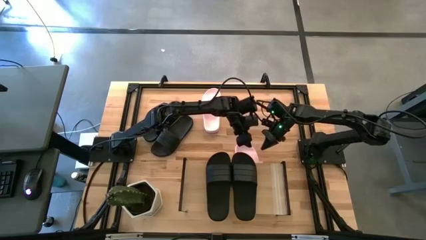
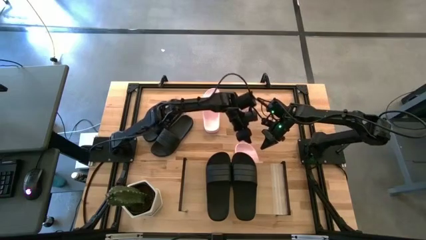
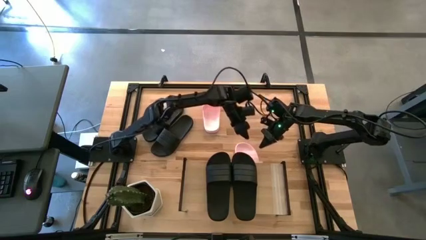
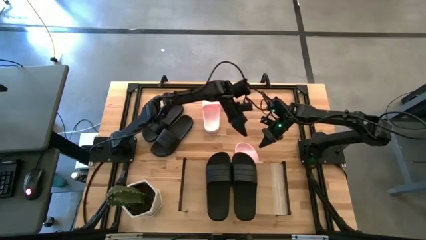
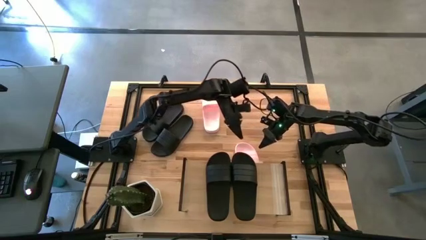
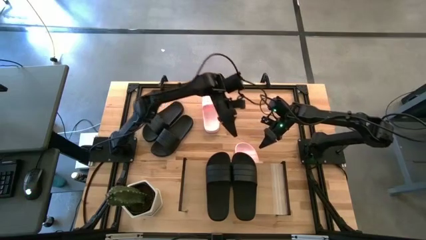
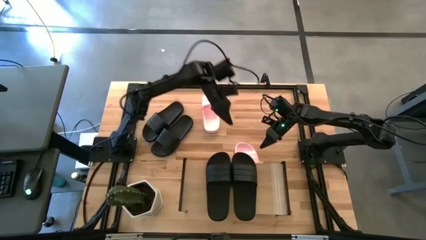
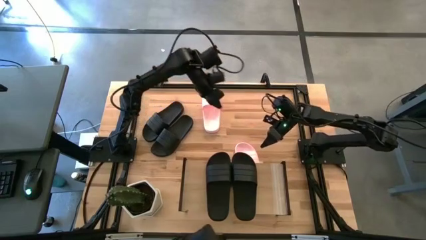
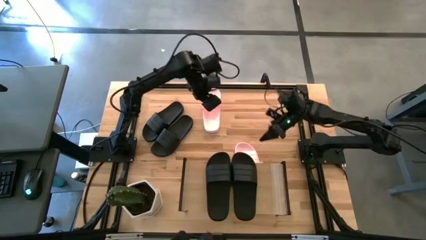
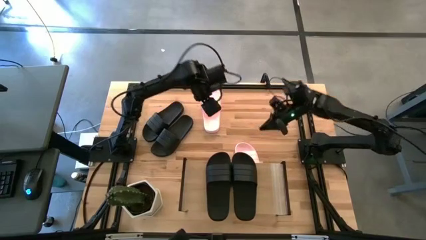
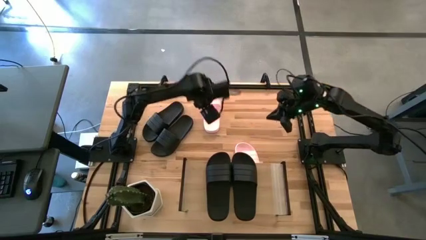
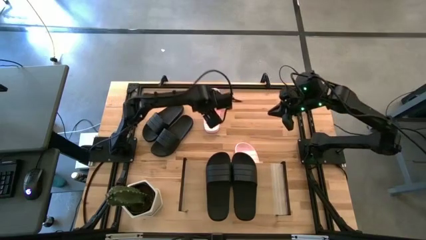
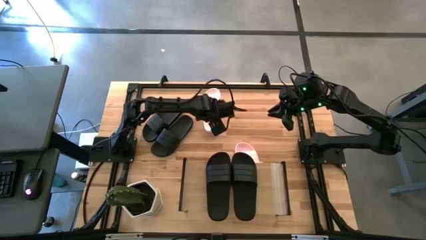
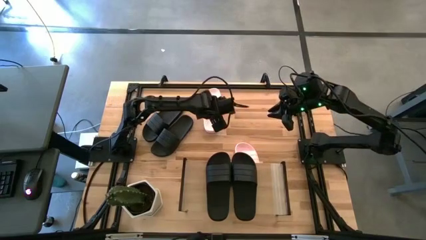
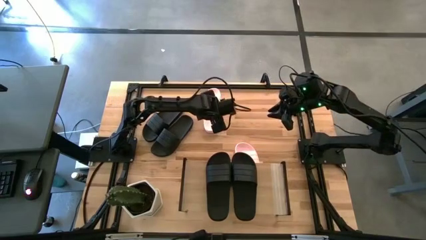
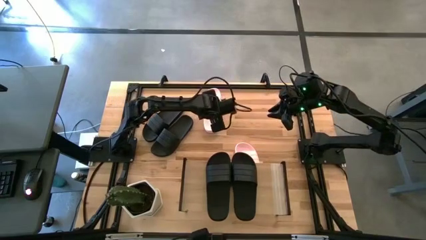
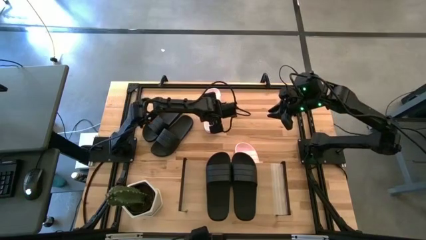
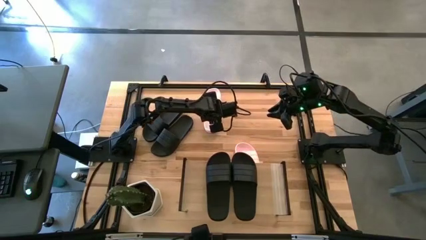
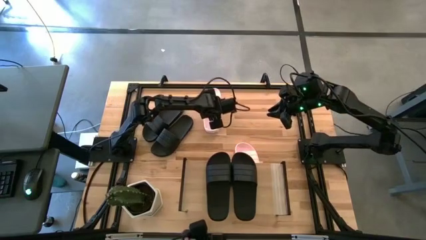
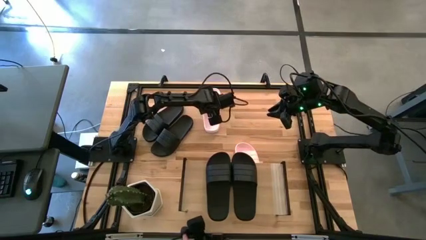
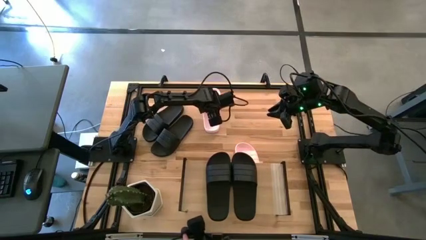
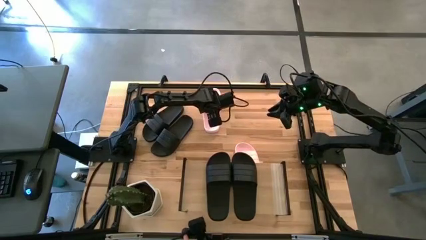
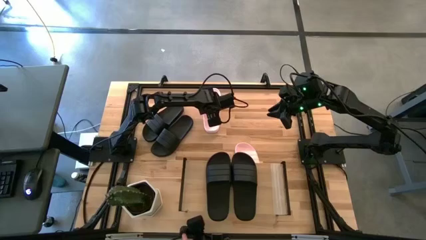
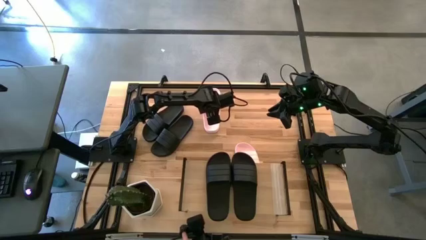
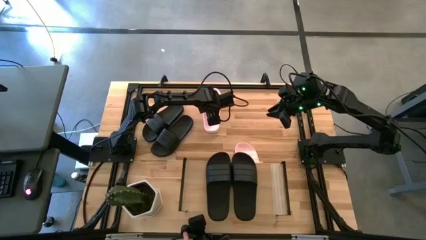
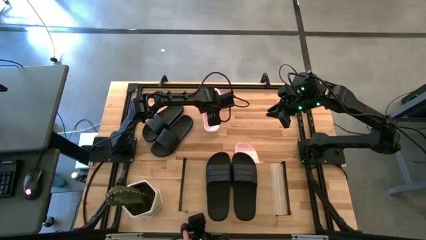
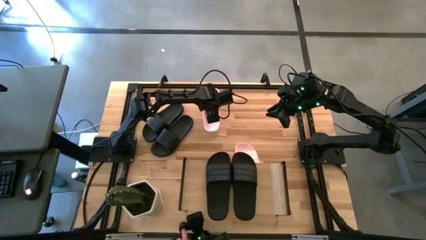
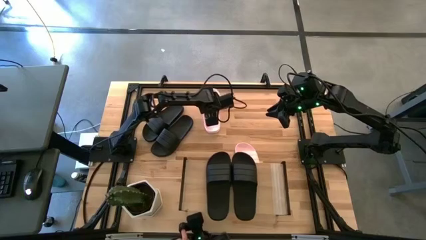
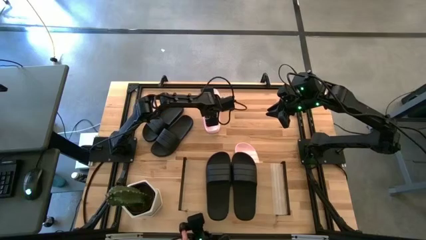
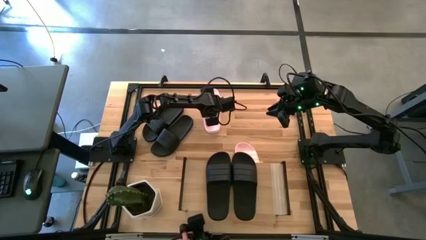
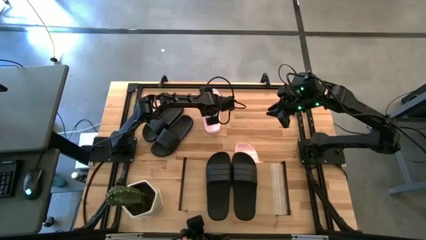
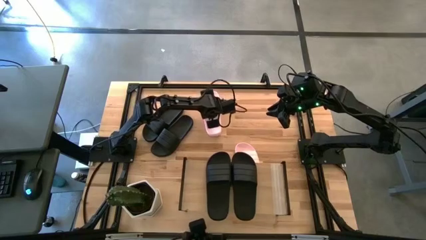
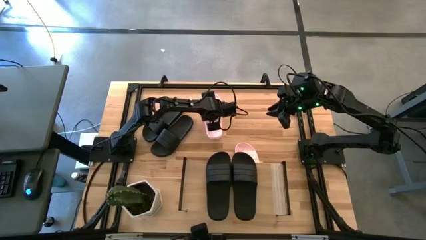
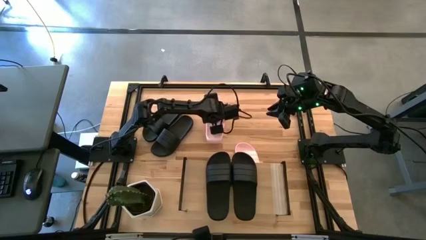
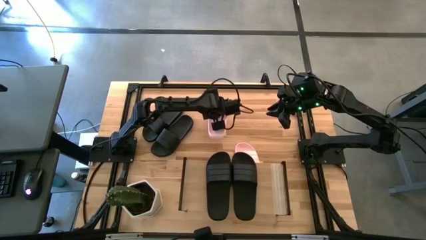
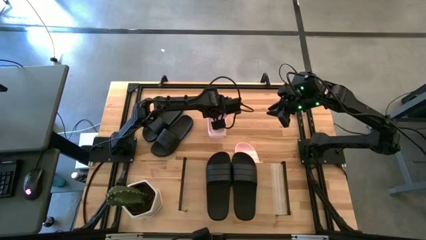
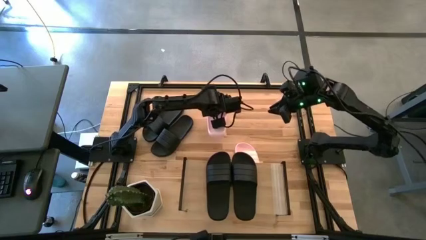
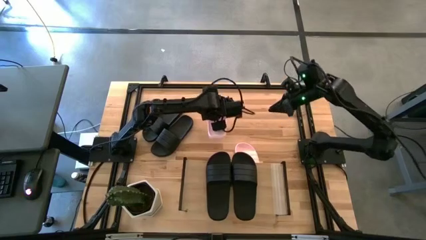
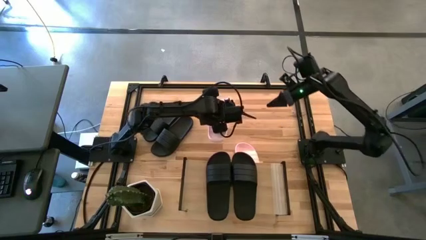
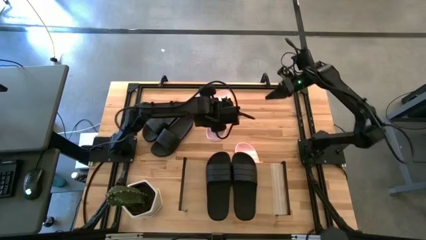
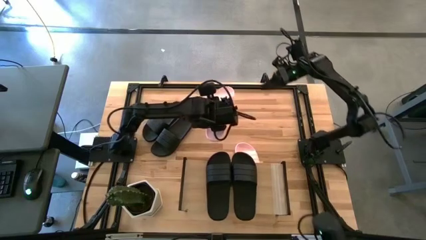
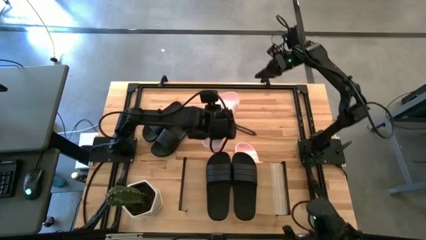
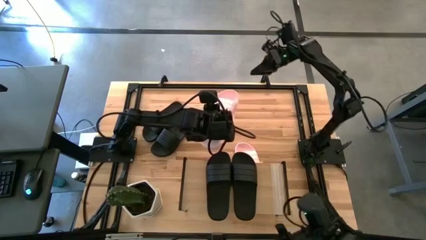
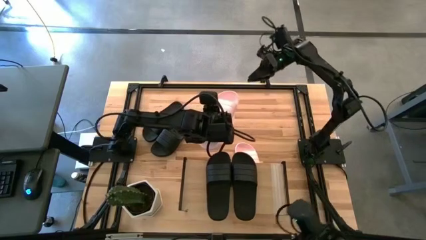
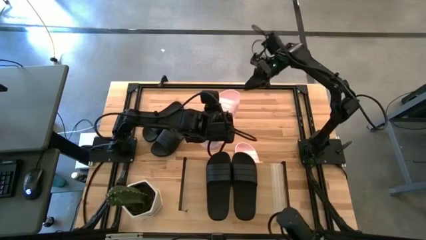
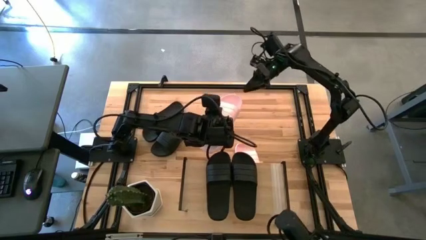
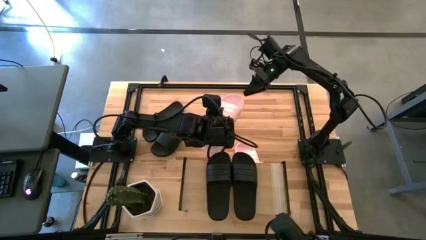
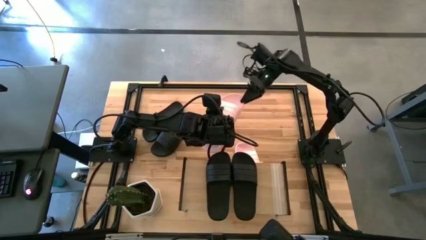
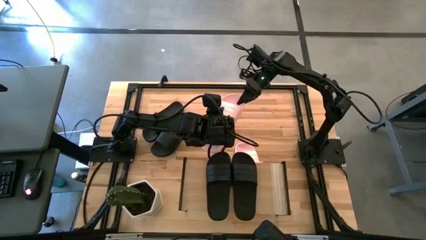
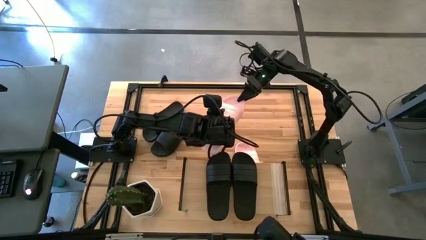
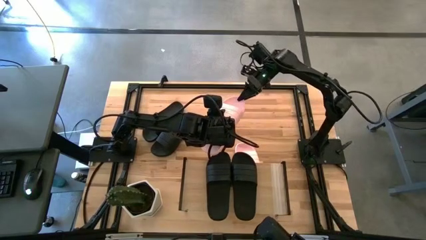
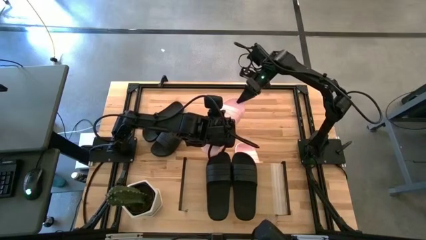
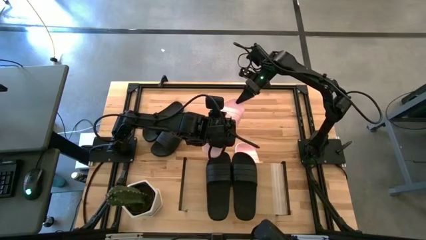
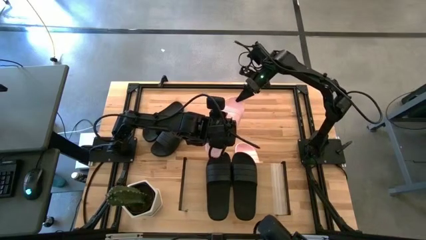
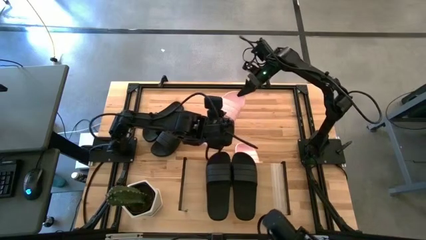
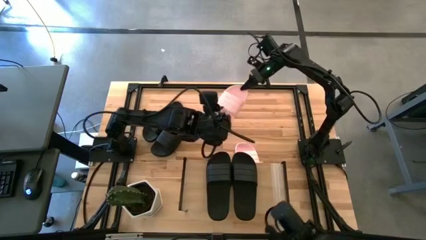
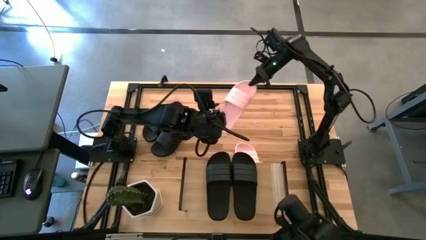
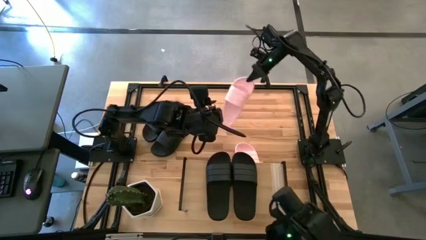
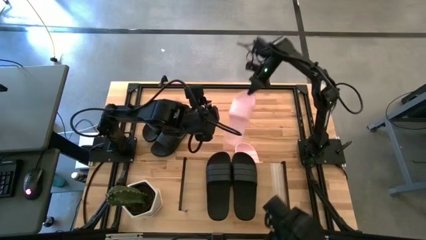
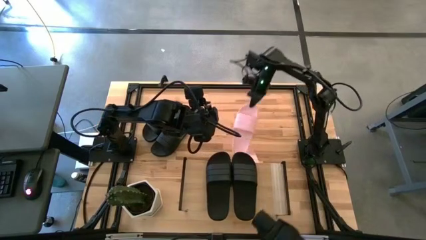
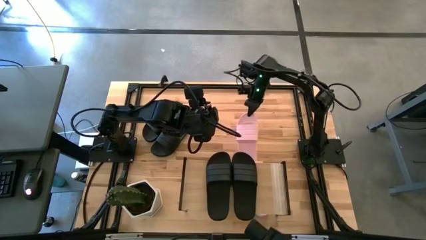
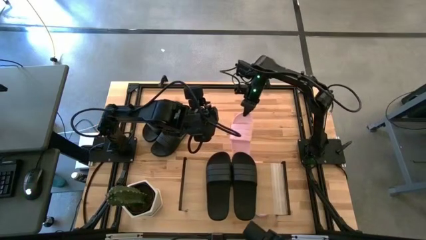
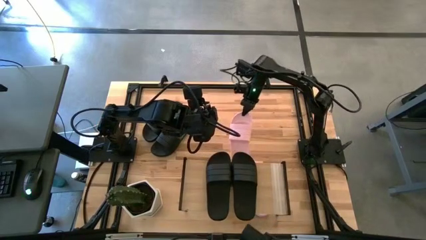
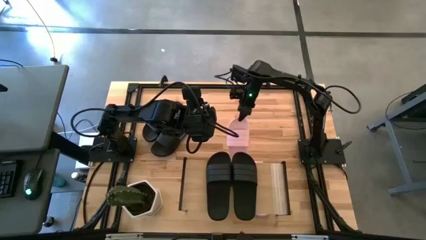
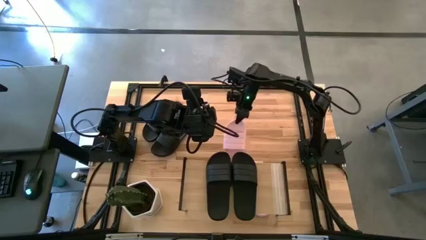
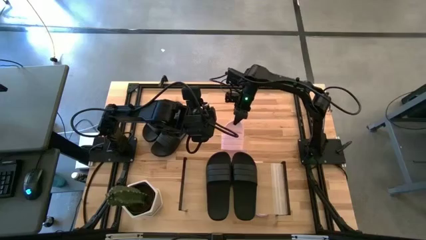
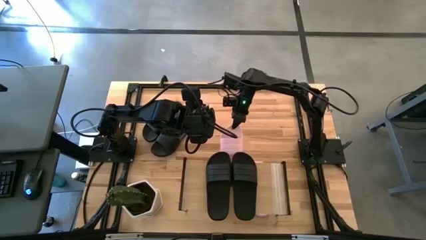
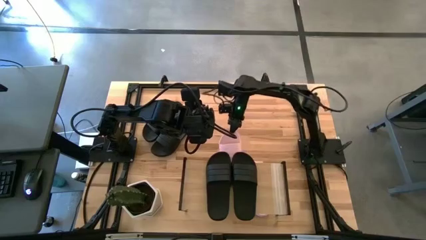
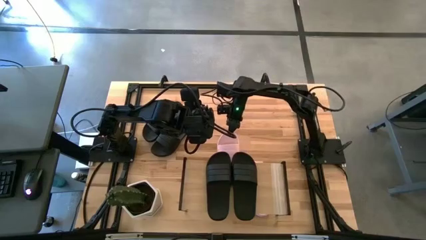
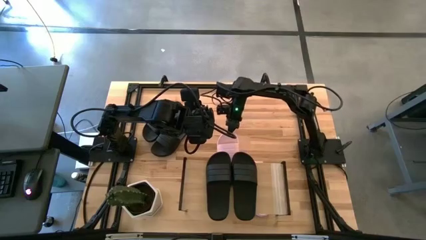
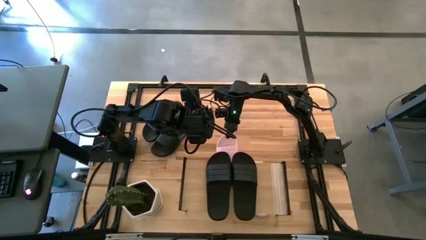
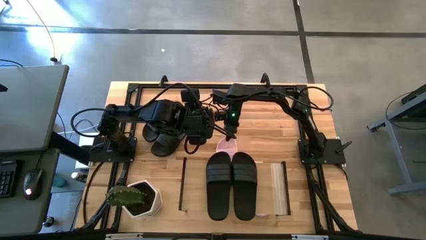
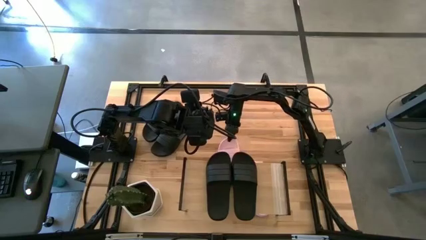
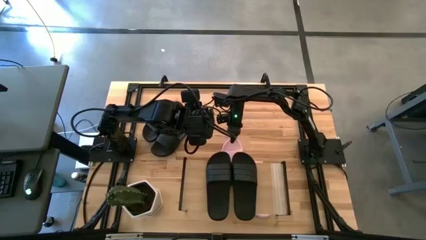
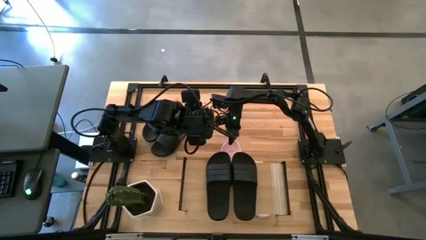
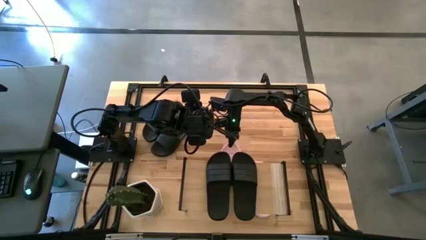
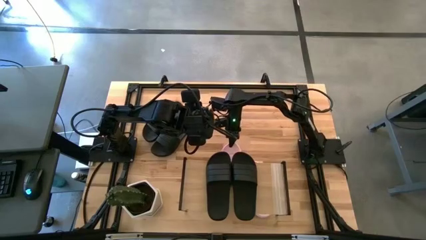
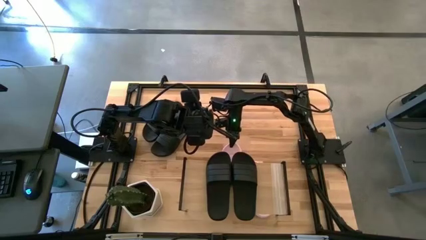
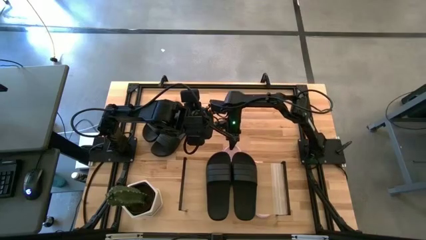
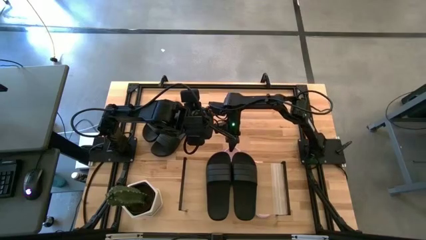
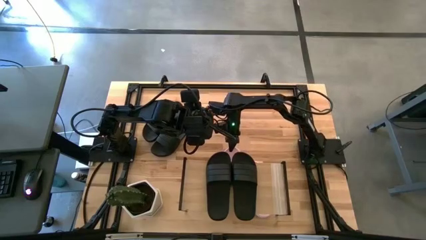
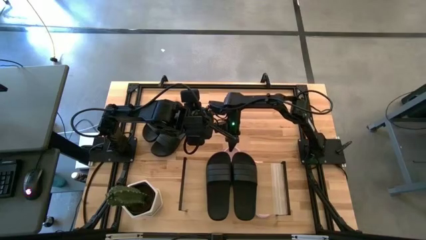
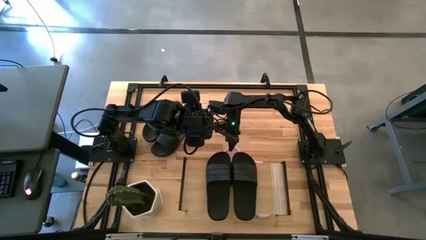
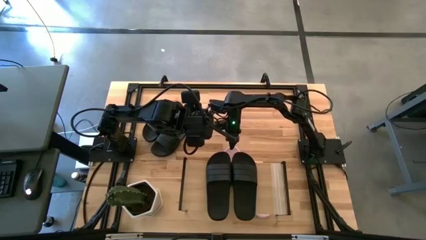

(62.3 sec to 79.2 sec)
Task: Pick and place slides into the shelf
Put the pink slipper under the shelf
